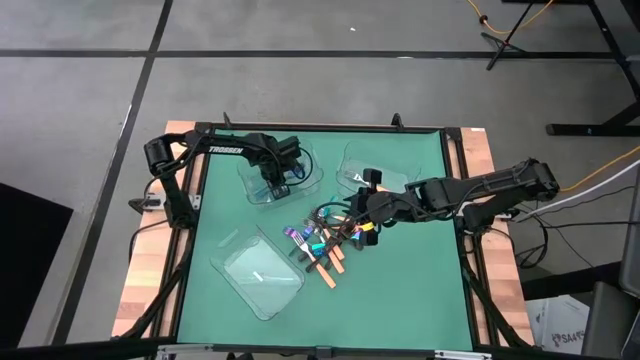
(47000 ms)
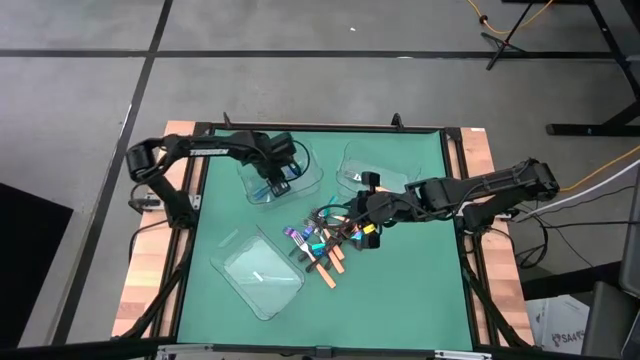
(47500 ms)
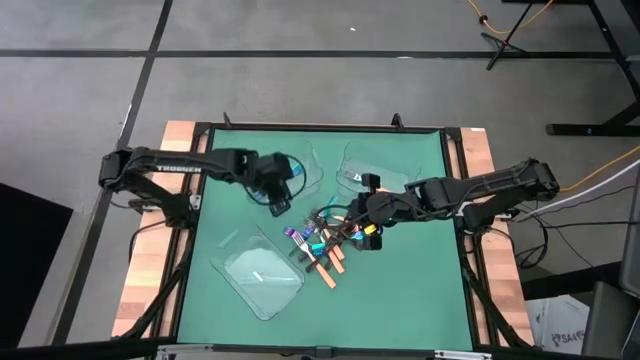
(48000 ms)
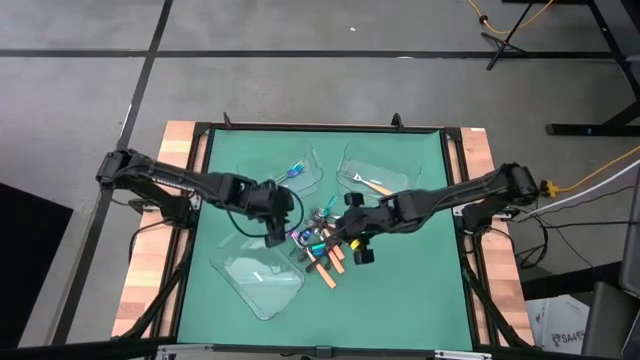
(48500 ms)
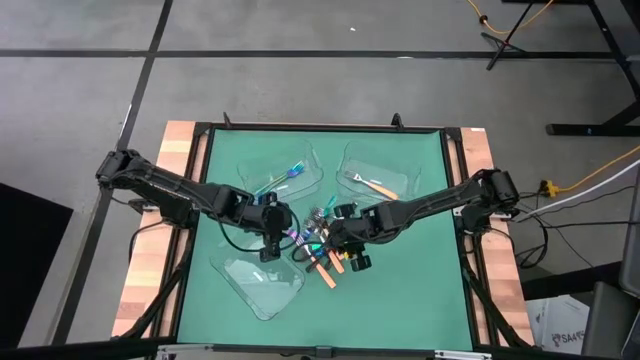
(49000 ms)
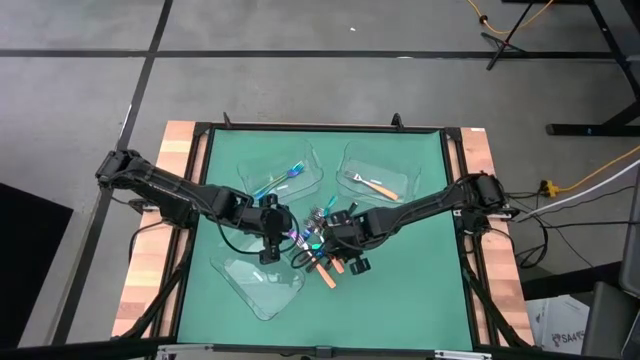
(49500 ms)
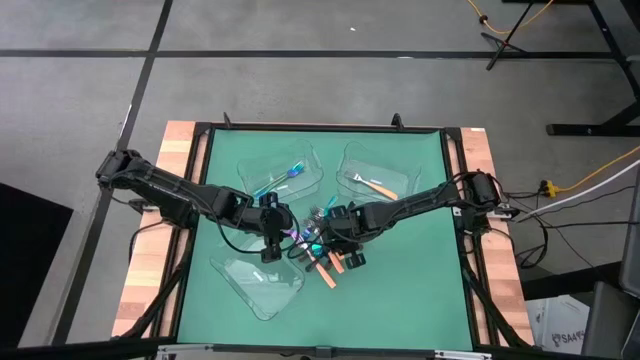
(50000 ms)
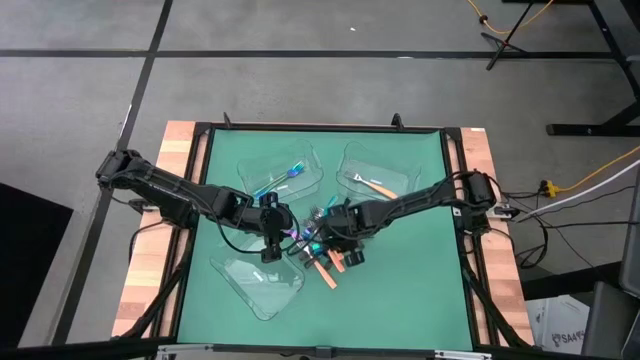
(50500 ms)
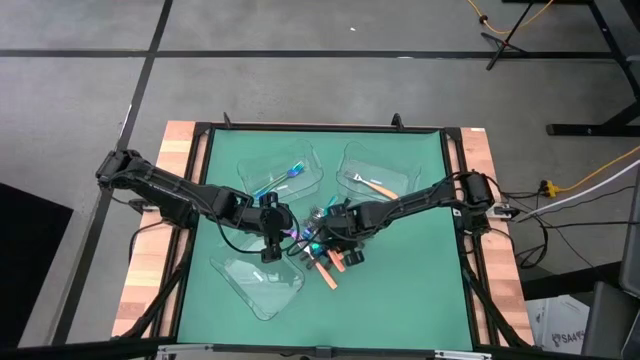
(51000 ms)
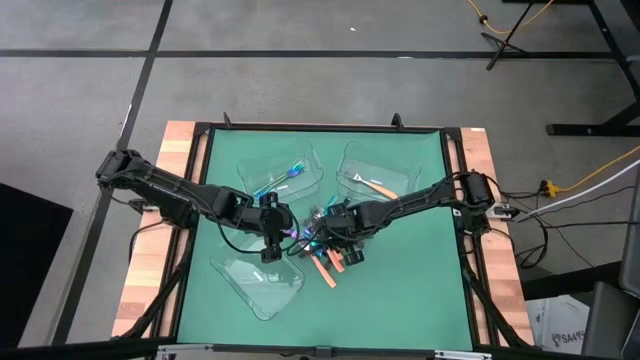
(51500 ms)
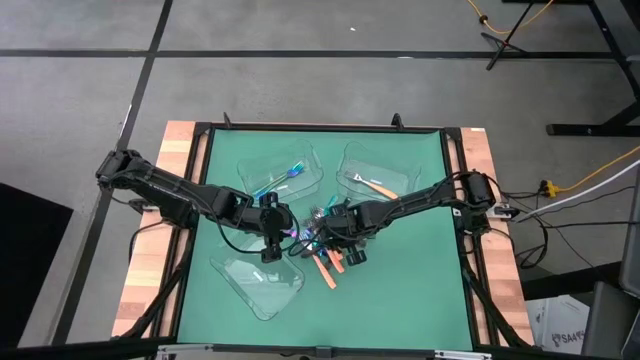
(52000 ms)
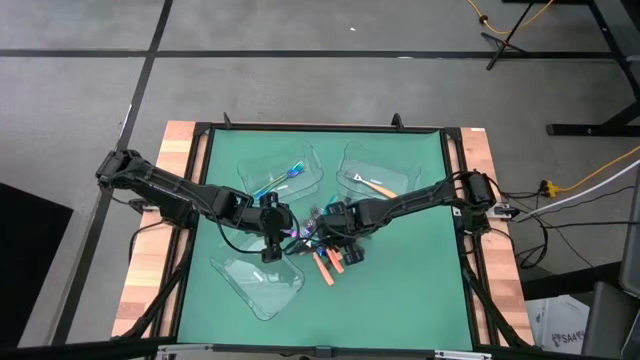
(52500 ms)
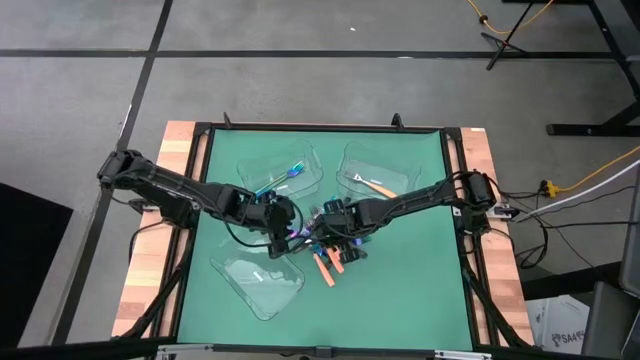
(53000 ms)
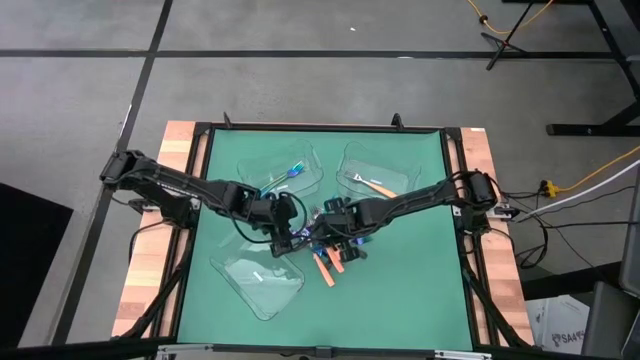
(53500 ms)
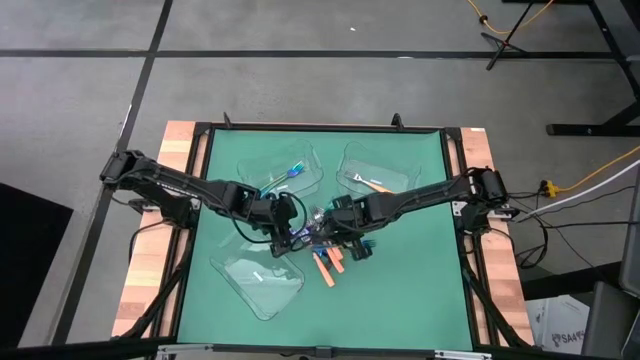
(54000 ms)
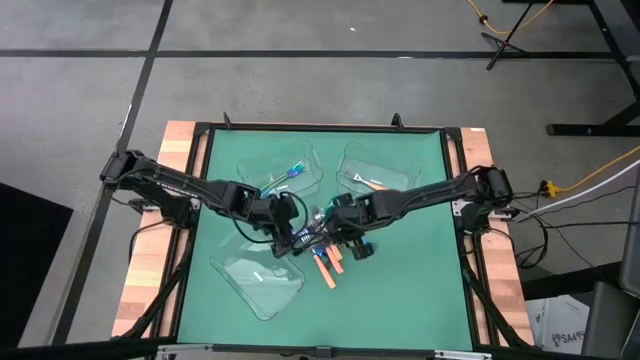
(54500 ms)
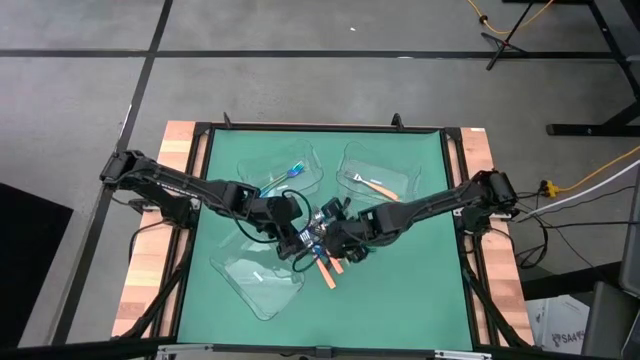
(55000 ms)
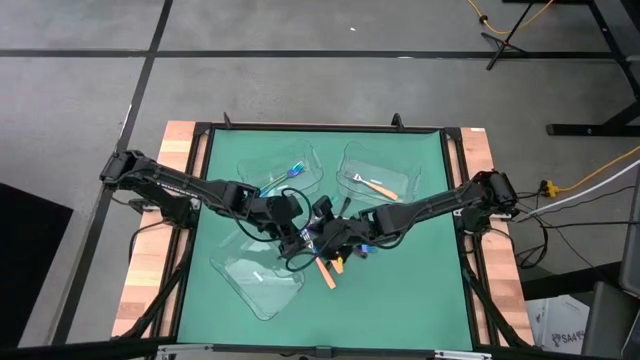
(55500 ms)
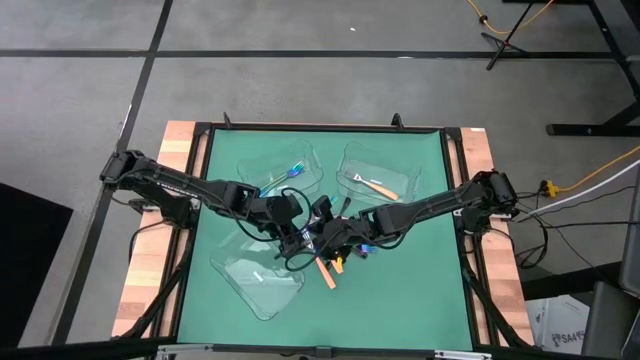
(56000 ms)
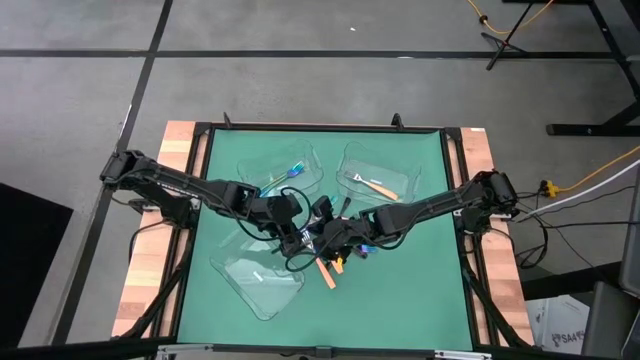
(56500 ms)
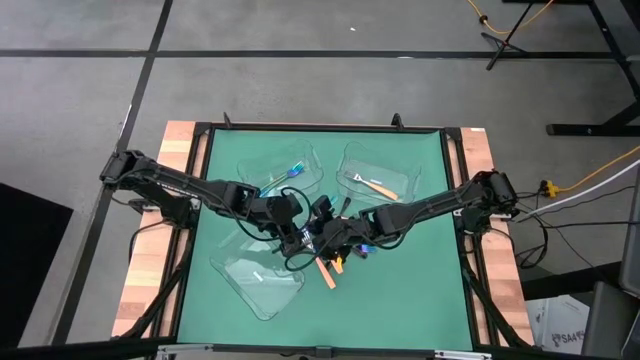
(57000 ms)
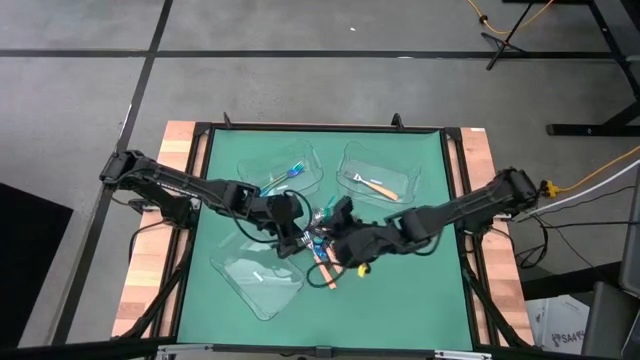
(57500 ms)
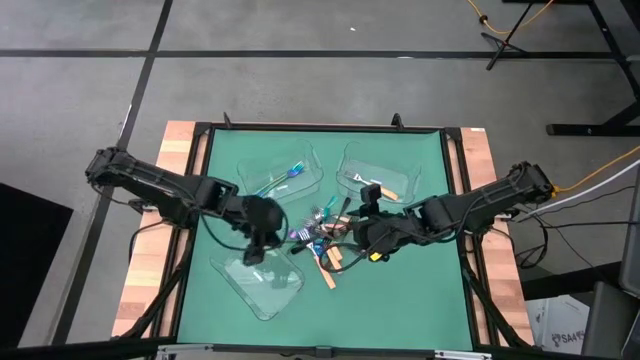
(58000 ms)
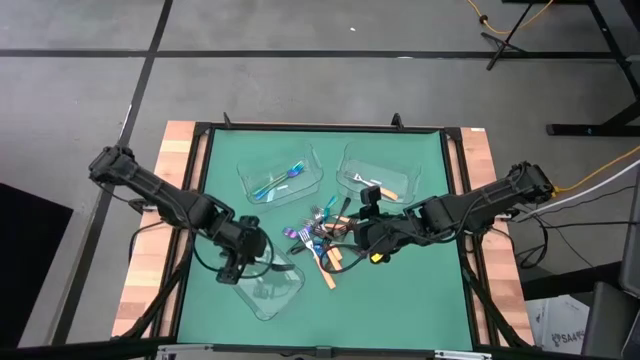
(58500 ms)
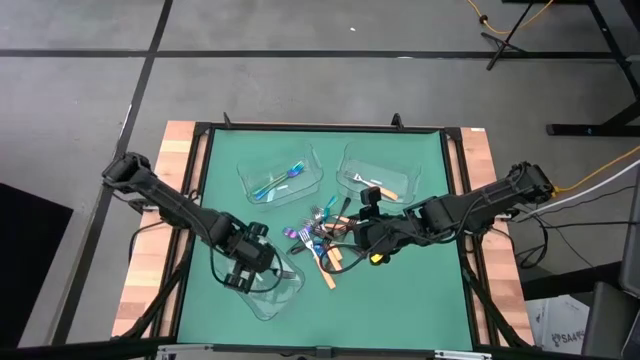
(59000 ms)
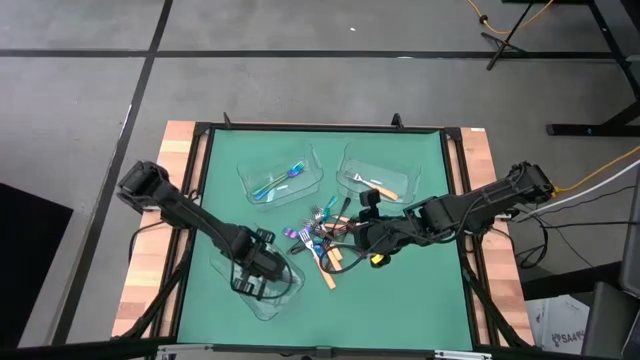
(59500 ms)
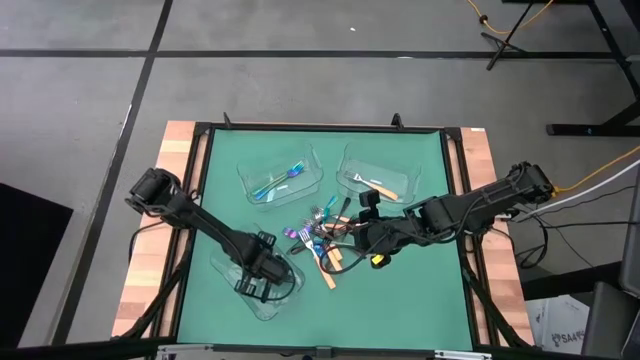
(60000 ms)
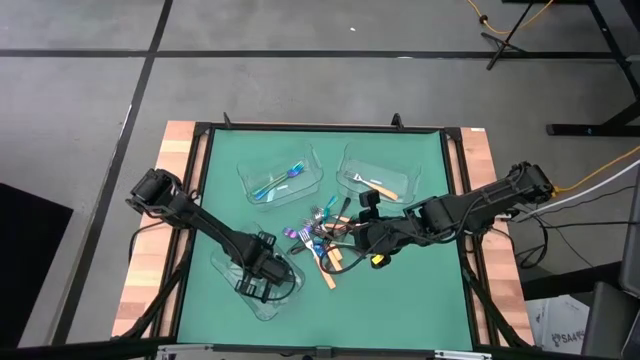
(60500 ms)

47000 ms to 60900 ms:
Task: Sort silverware by color (type)
Put the black fork into the bottom transparent bin
